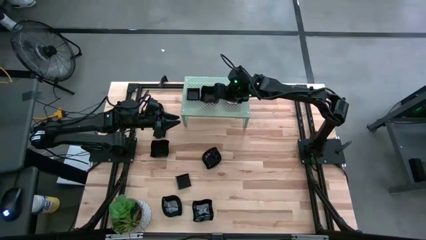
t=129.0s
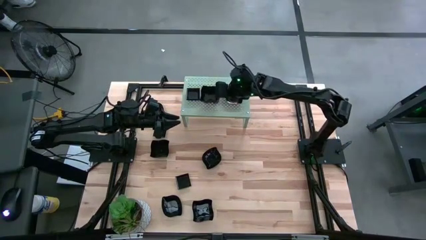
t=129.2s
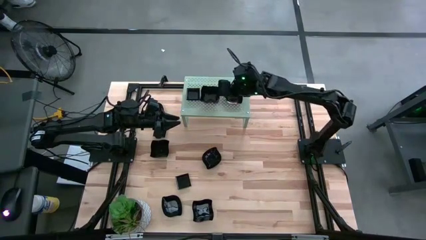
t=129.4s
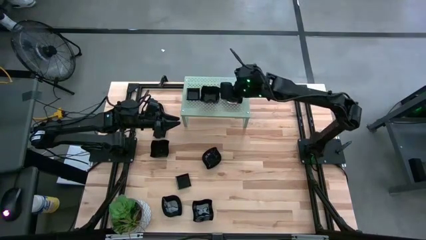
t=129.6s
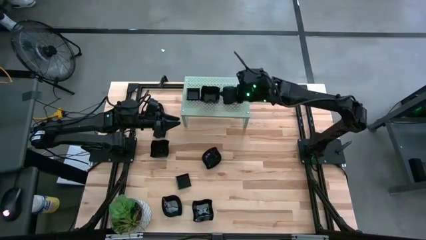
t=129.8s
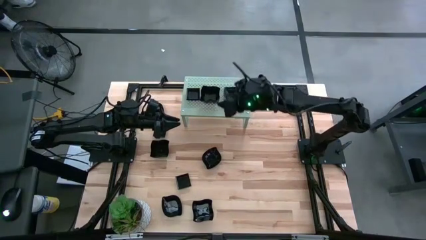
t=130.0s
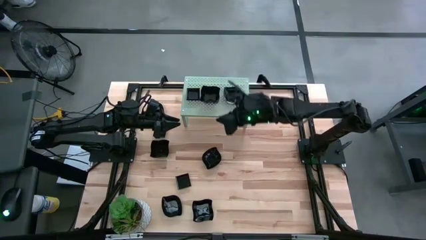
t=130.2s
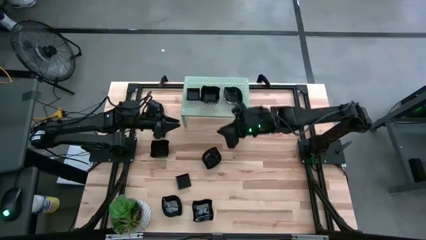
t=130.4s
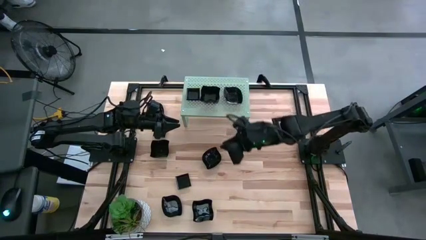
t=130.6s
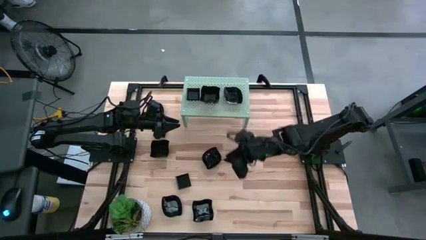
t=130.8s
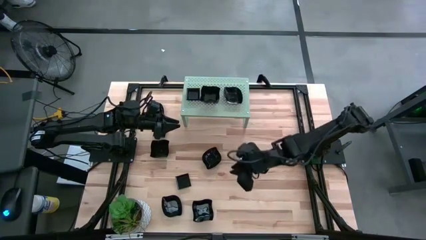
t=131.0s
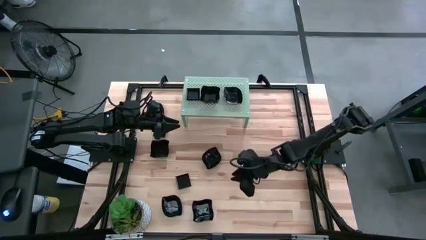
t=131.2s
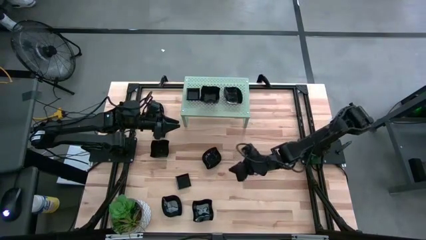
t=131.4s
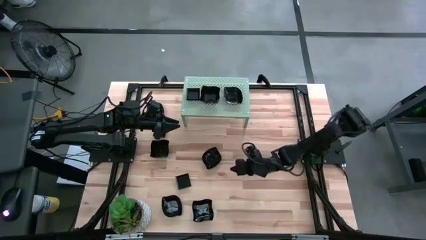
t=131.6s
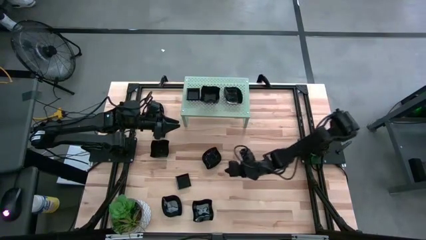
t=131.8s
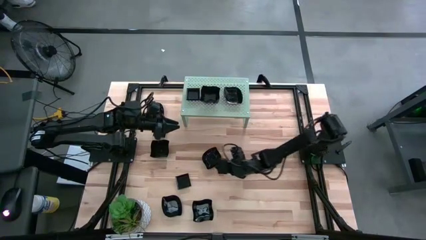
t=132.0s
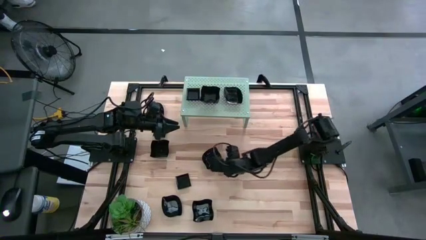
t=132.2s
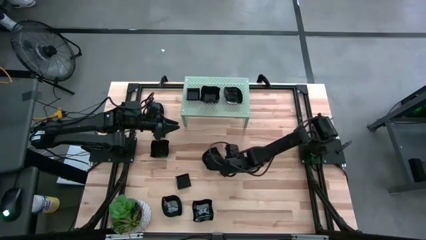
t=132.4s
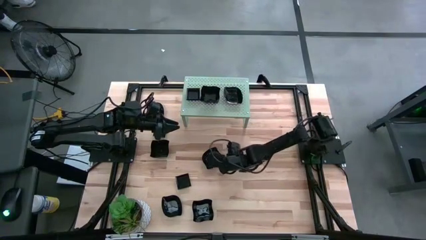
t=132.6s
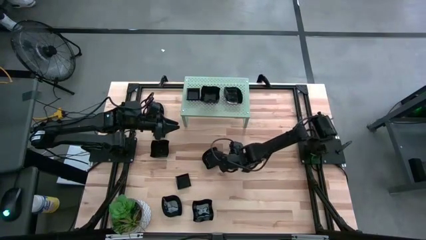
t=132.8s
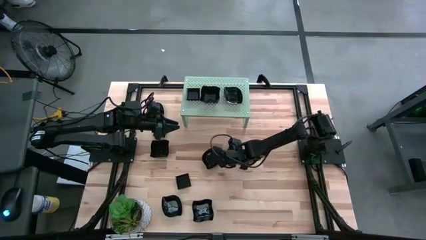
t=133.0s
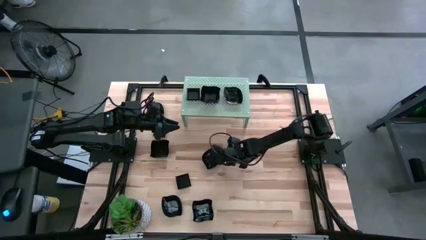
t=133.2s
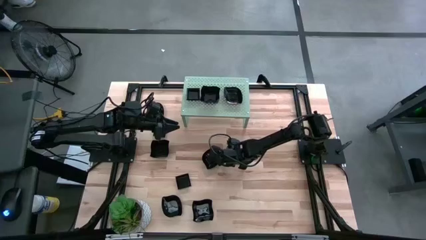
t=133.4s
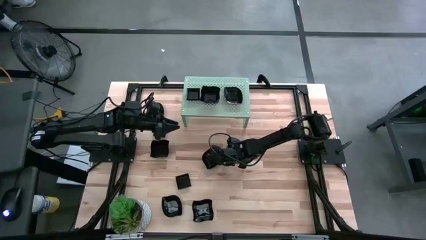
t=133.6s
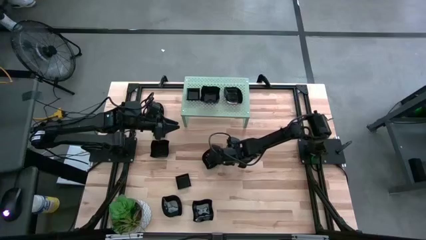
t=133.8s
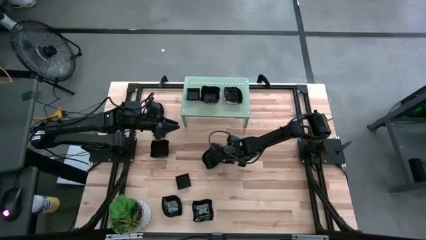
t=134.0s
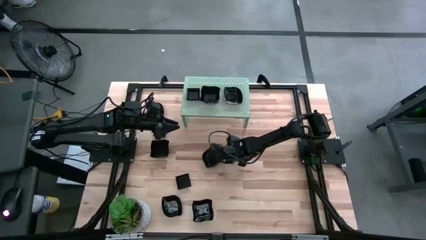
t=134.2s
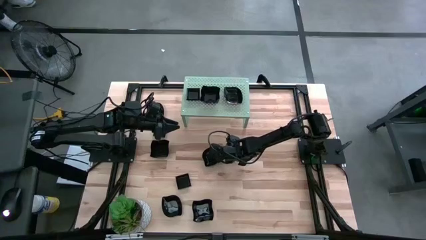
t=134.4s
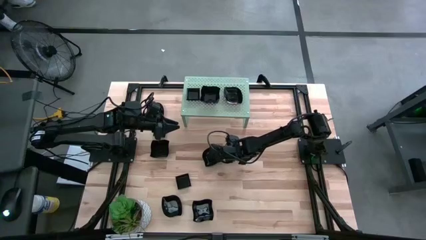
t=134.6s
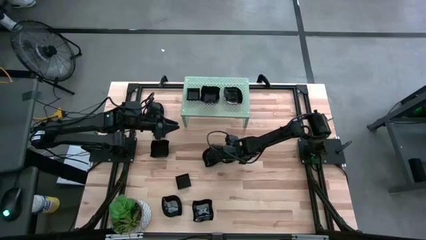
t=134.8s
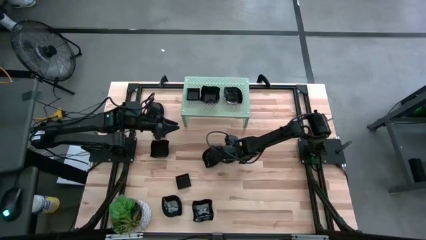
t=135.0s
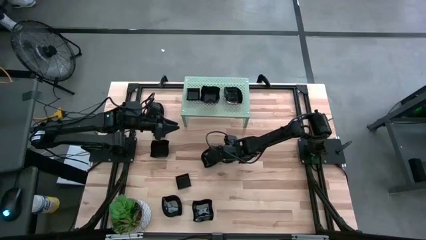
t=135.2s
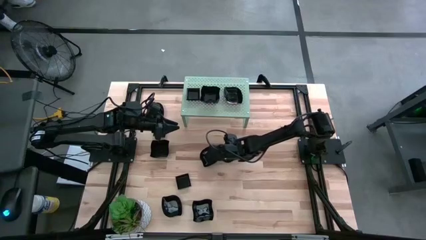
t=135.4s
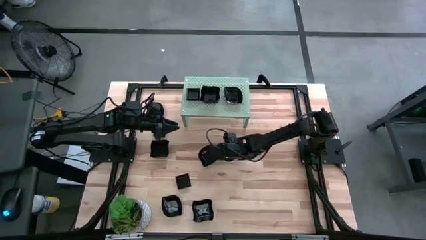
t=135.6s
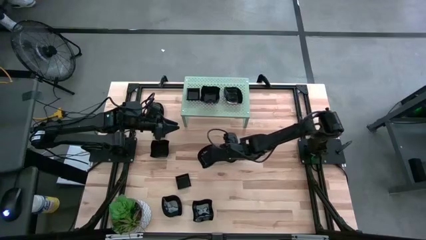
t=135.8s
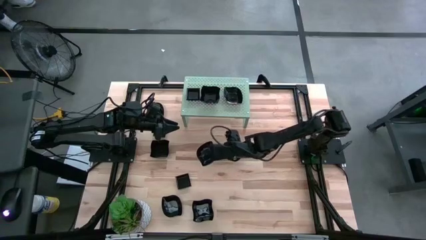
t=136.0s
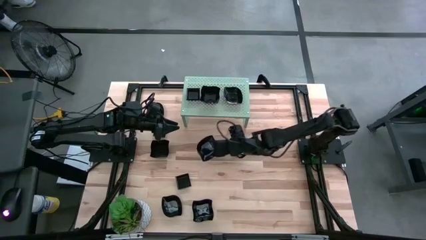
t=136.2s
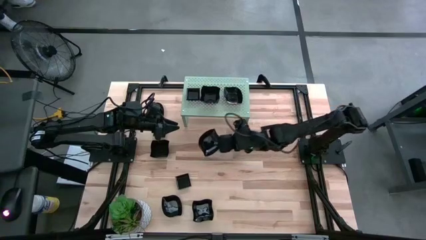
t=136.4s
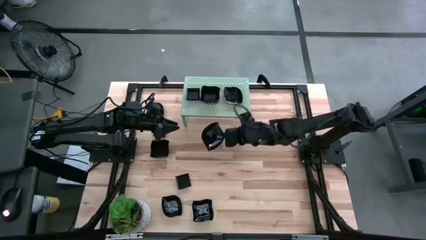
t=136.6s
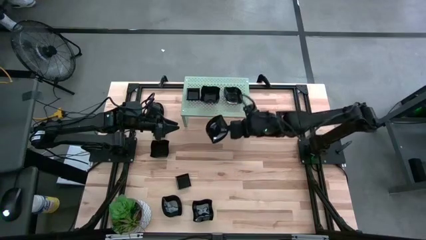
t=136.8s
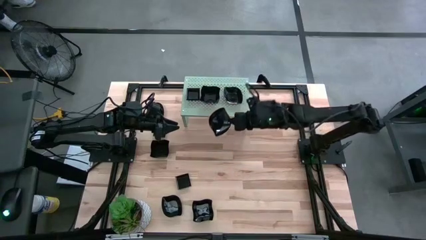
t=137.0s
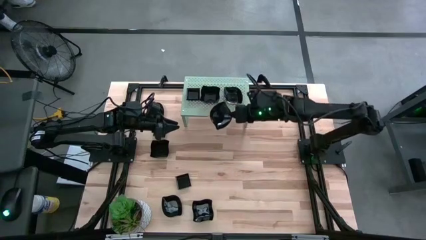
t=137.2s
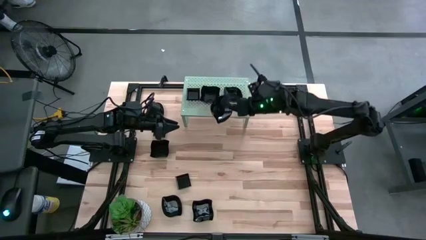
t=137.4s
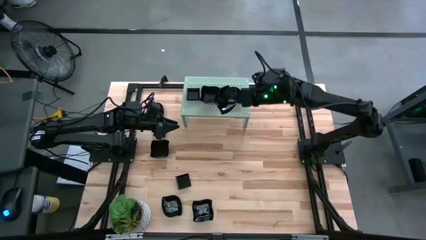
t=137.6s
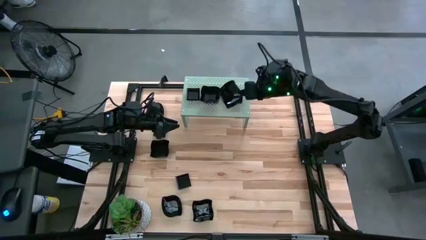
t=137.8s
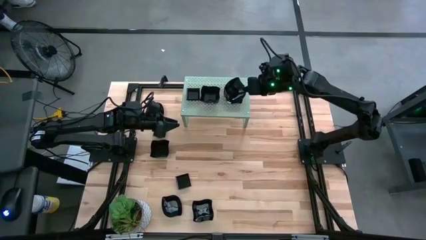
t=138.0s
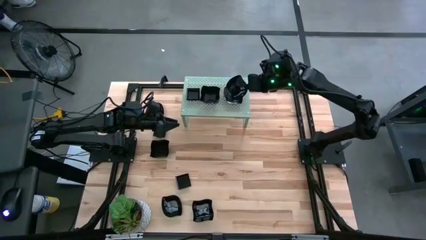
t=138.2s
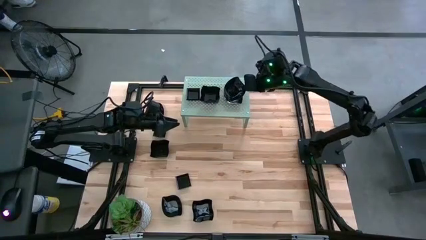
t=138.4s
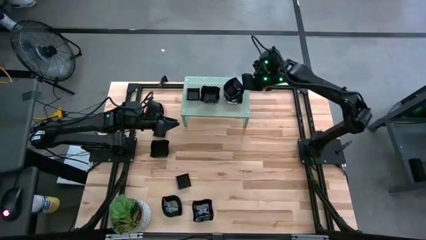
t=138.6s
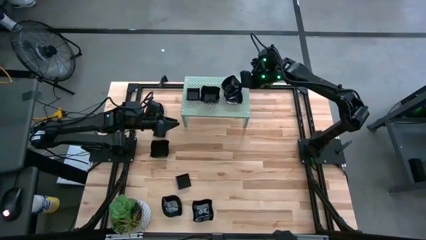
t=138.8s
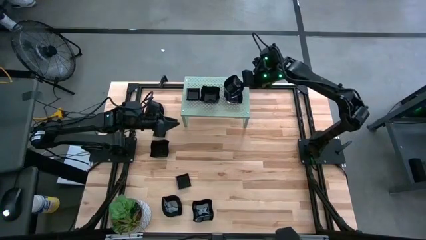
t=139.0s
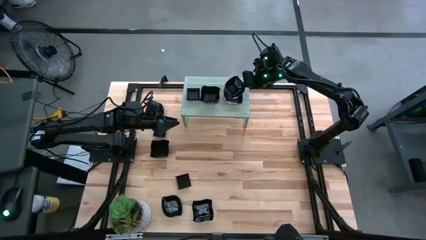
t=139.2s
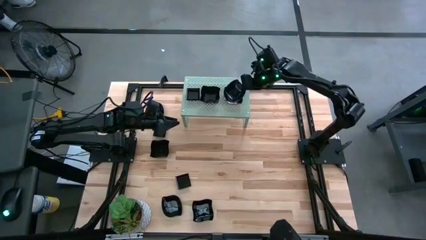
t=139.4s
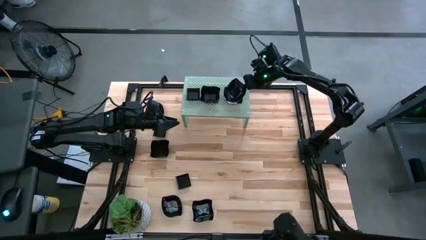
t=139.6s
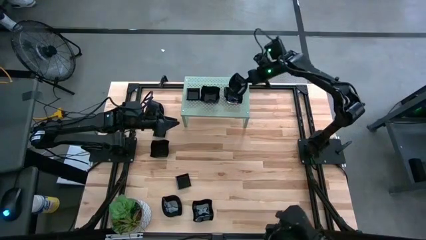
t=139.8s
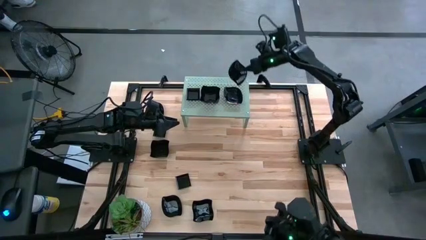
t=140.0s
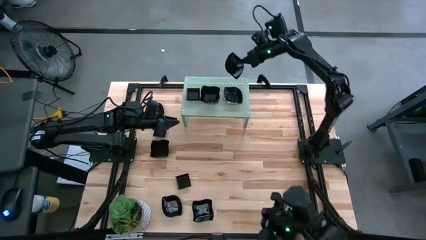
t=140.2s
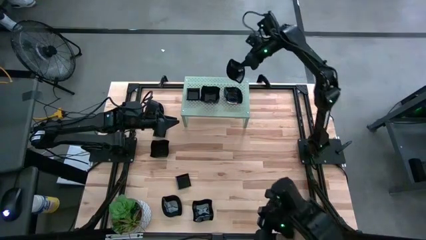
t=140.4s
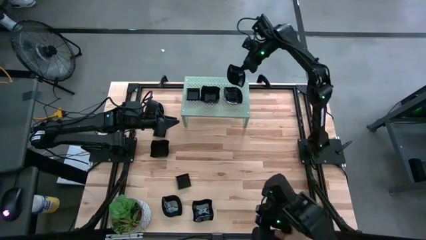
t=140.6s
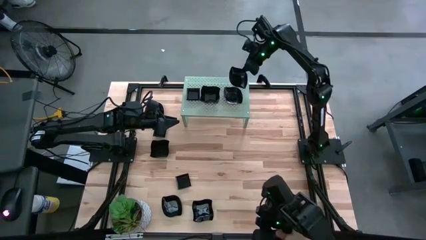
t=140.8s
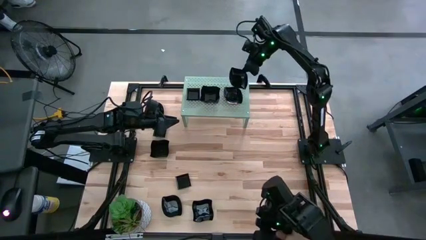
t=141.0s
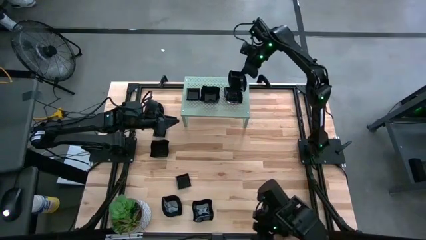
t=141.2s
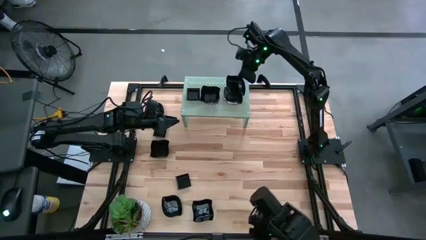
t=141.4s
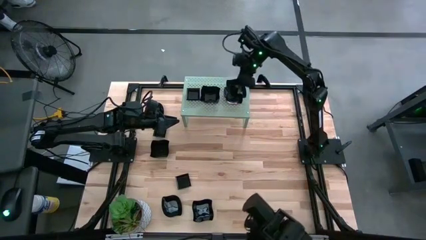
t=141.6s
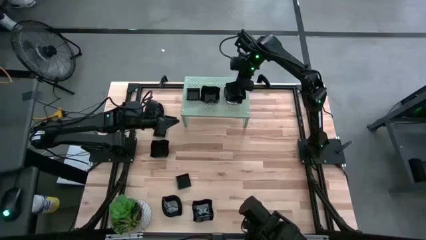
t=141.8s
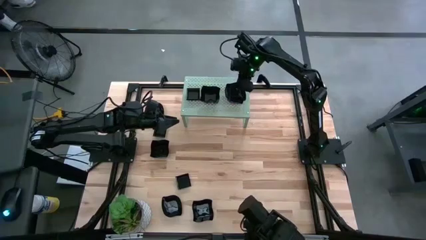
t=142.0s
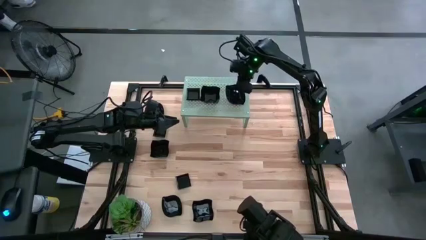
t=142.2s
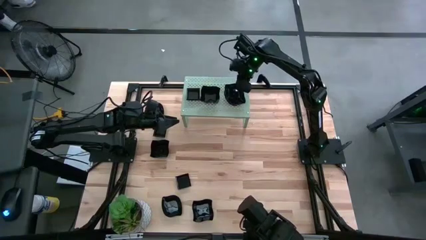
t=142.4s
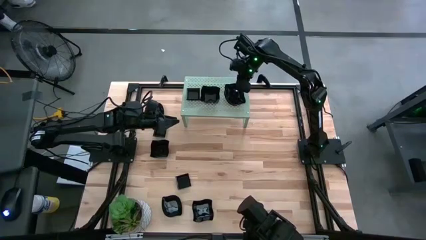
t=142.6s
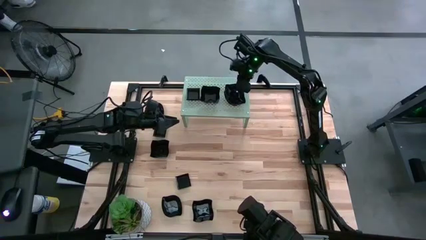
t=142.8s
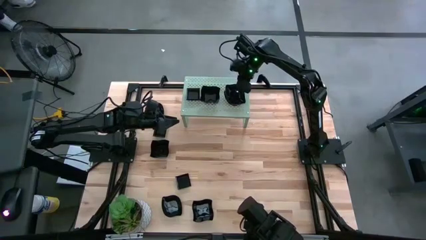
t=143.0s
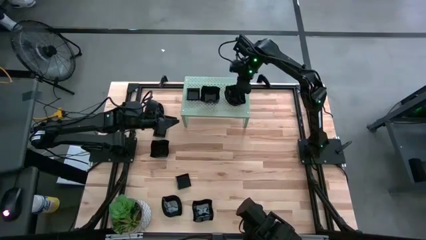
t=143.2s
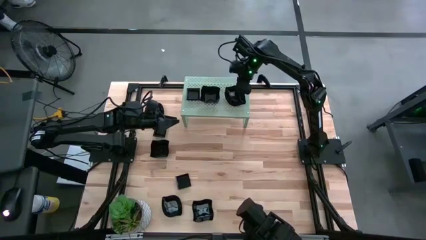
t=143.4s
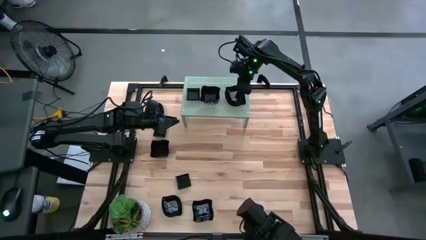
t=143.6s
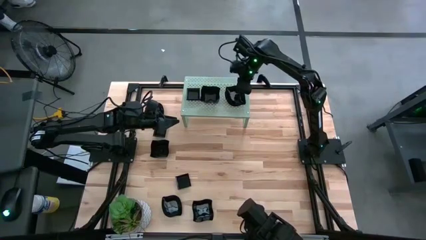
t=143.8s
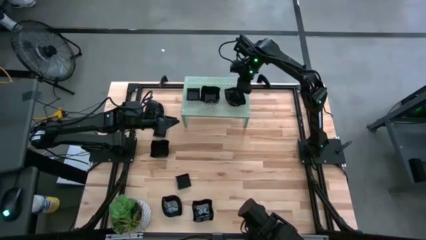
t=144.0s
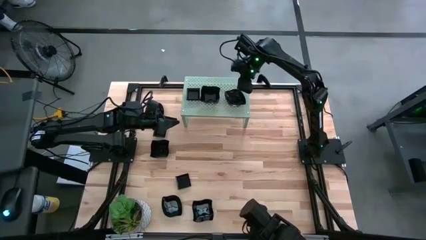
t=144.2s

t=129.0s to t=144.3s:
Task: Pick & Place Mini shaped plates
Stack the leaf shaped plate on top of the leaf shaped plate on the shelf
